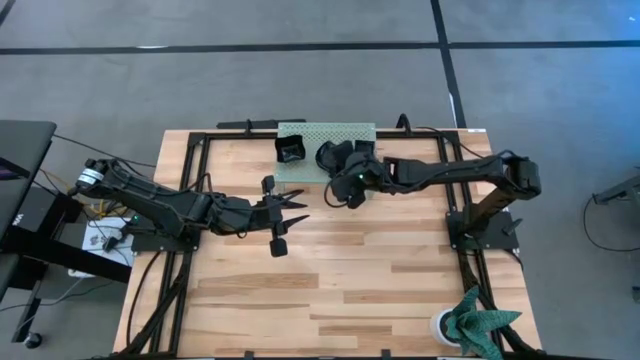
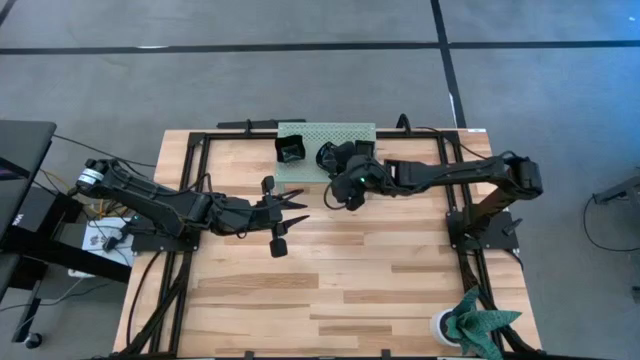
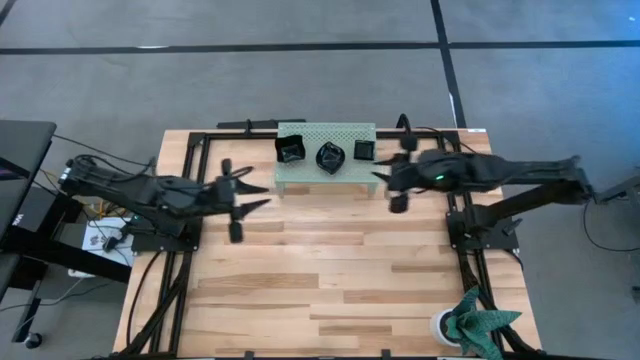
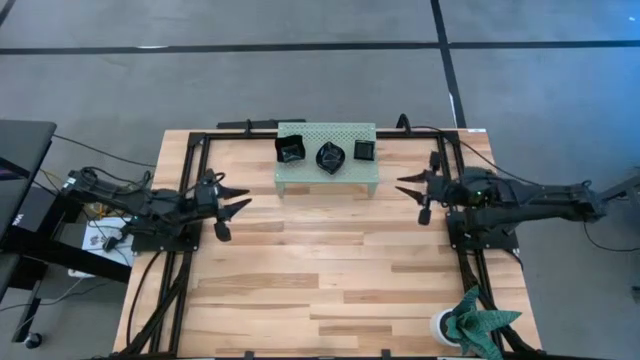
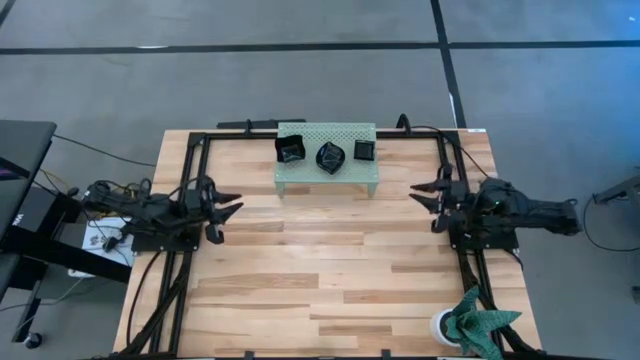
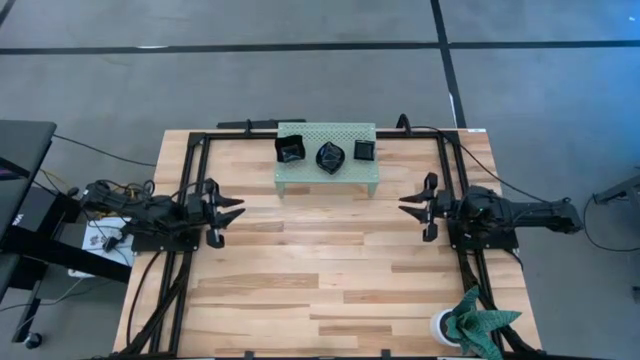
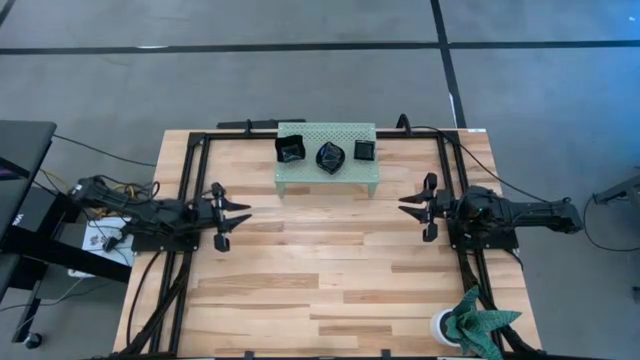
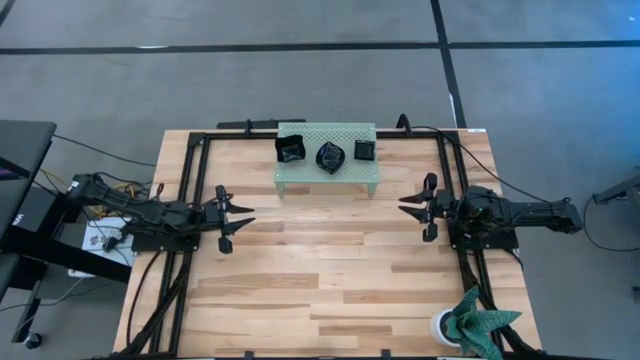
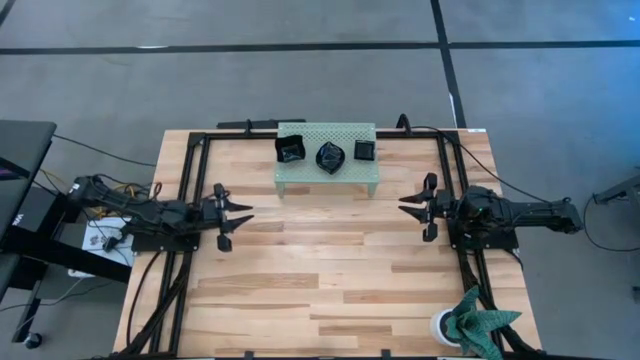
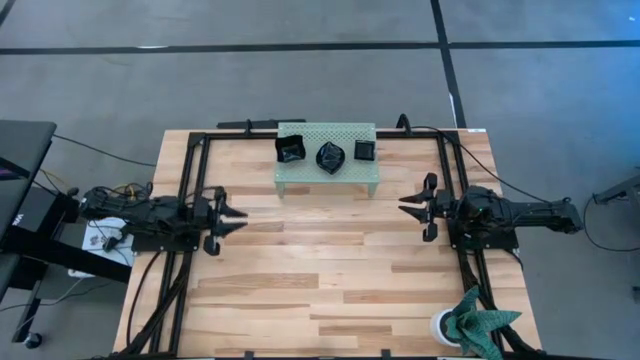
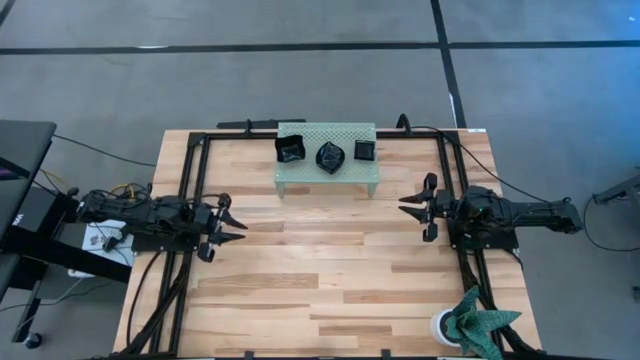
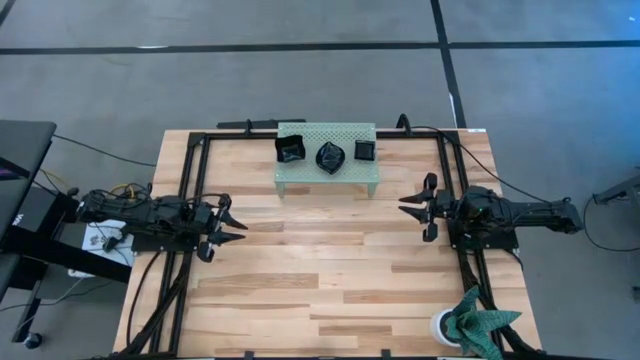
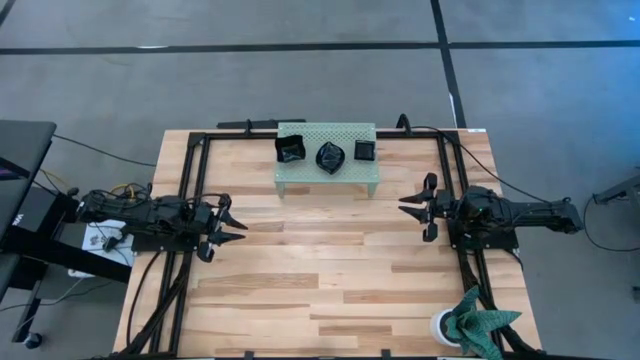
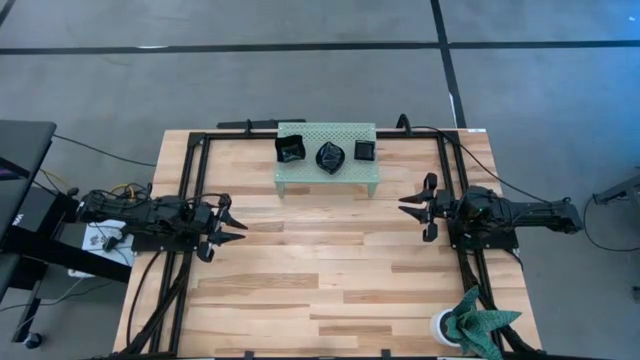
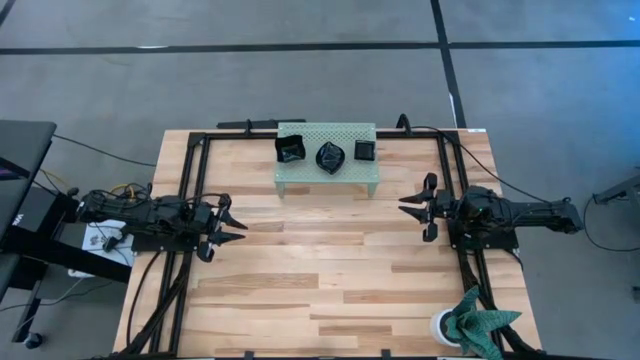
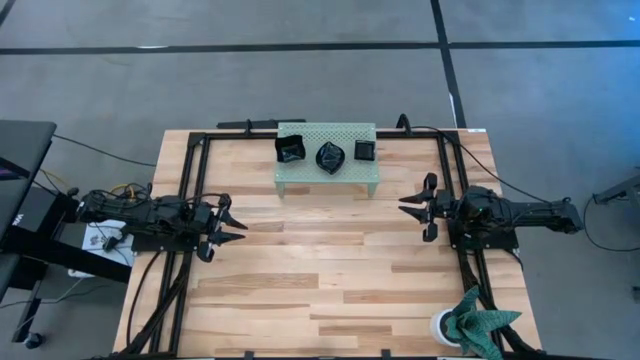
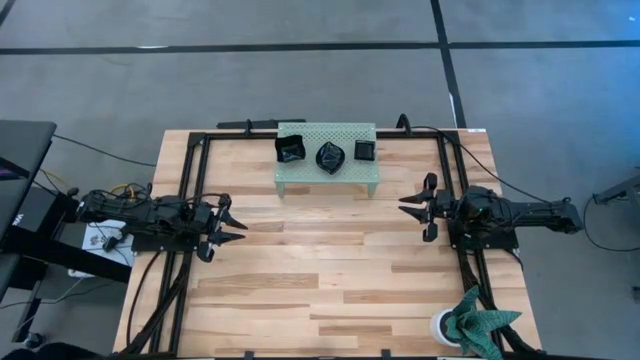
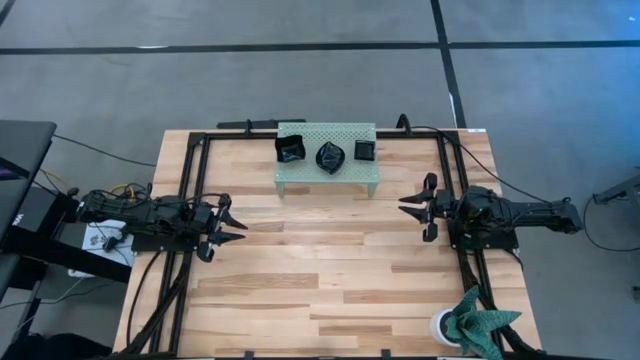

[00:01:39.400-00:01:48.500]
Task: Pick & Place Mini shaped plates
Return to Home Position

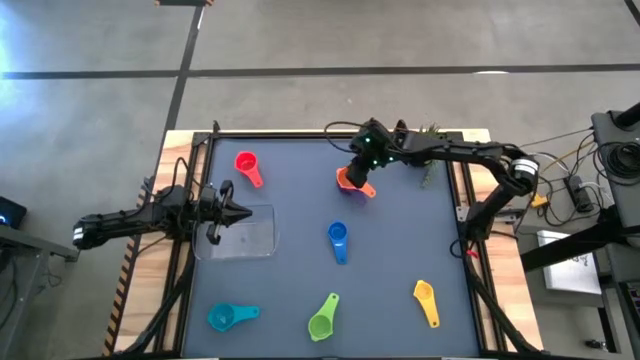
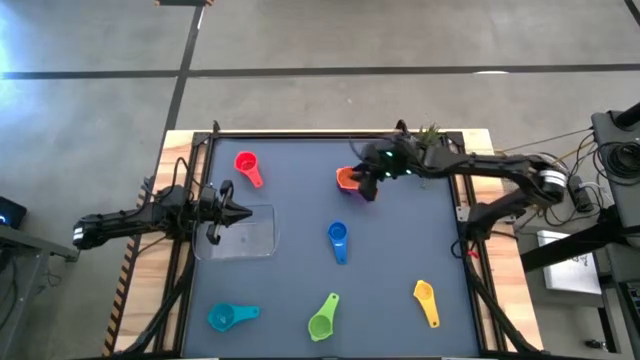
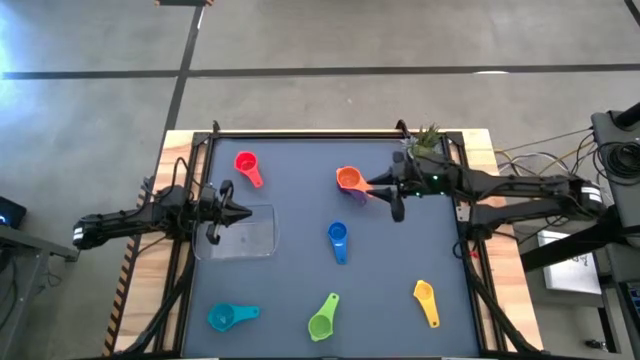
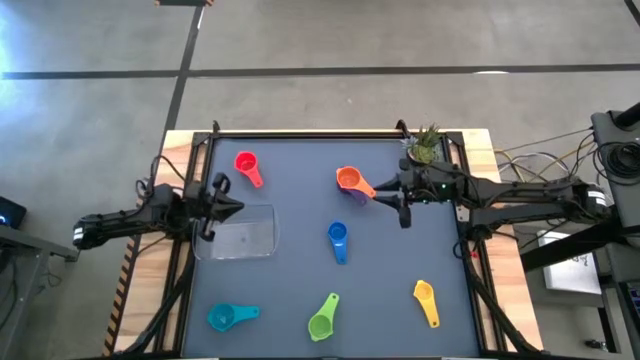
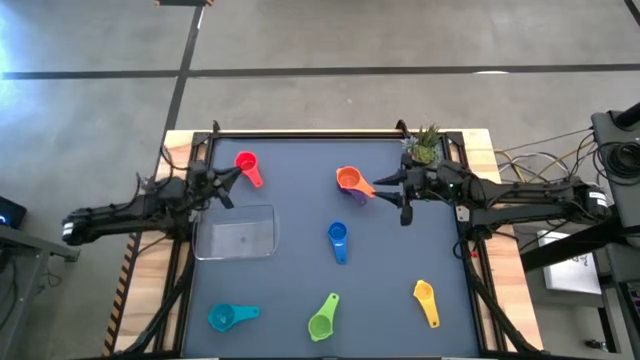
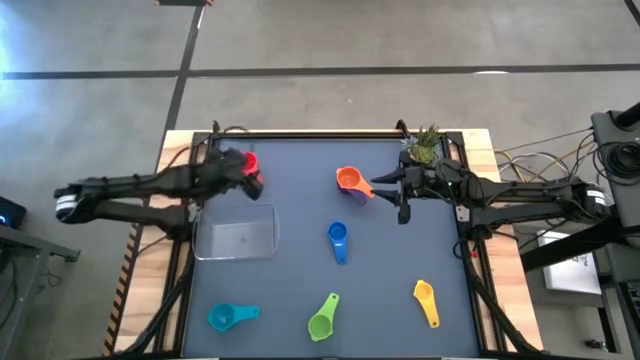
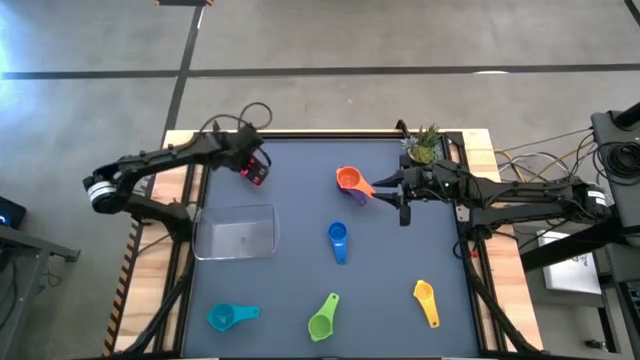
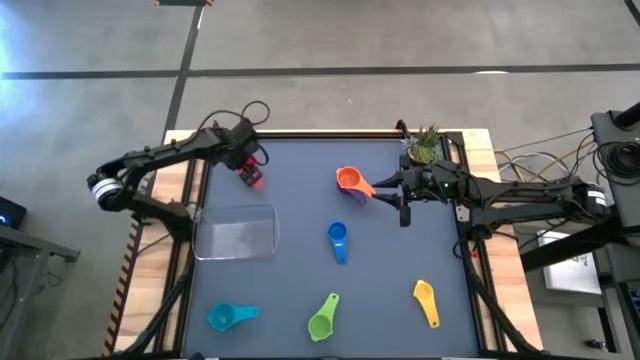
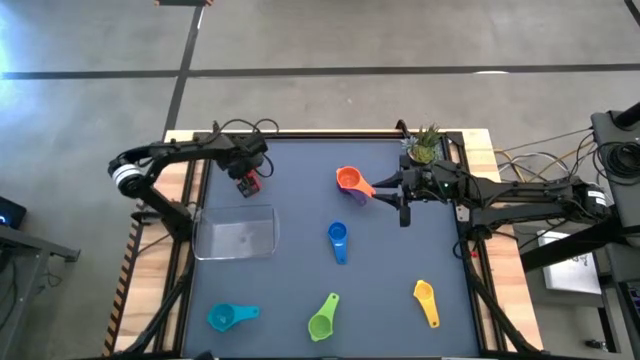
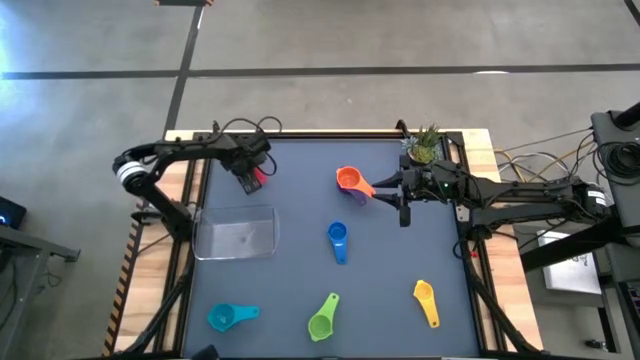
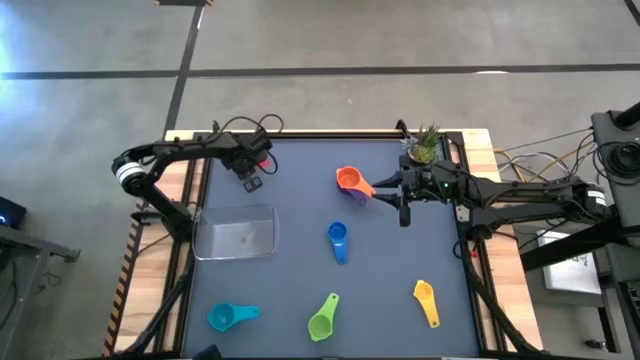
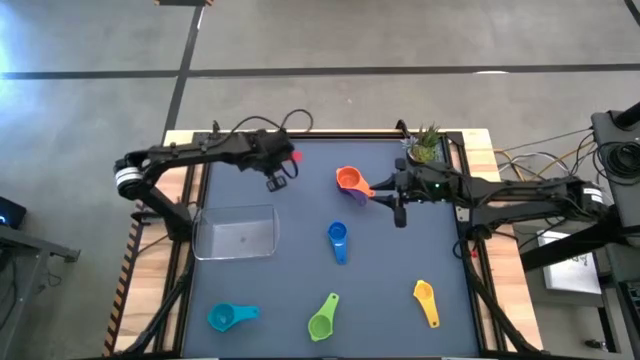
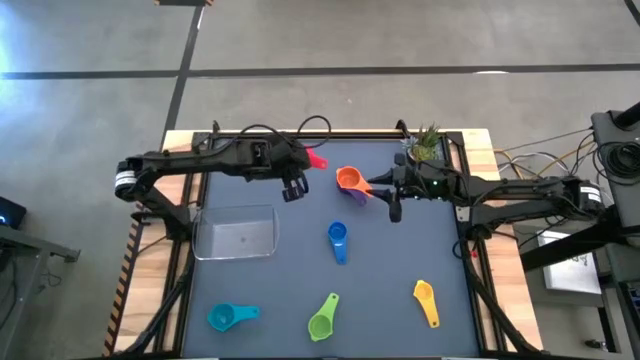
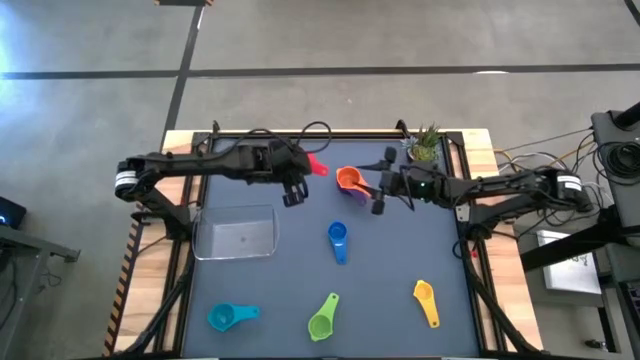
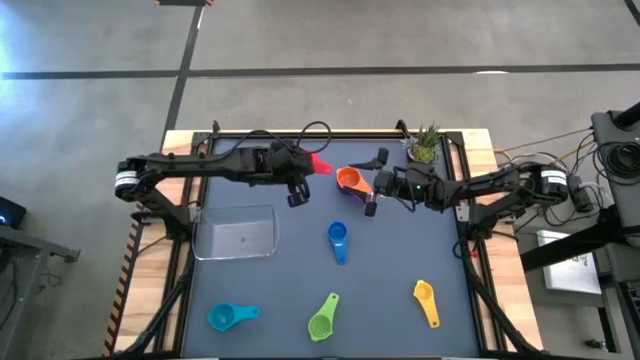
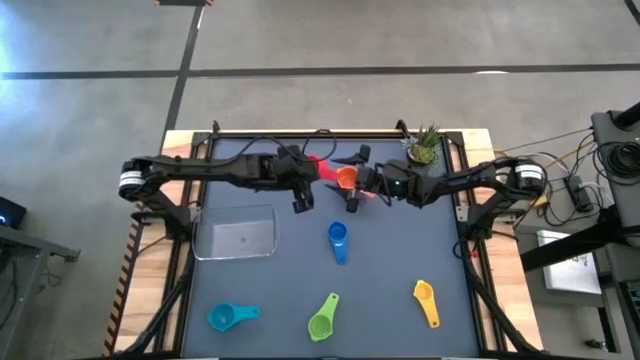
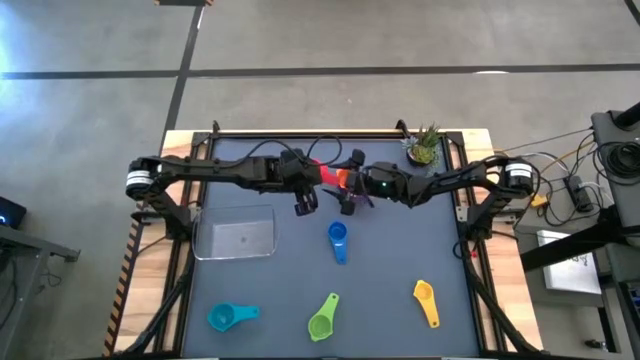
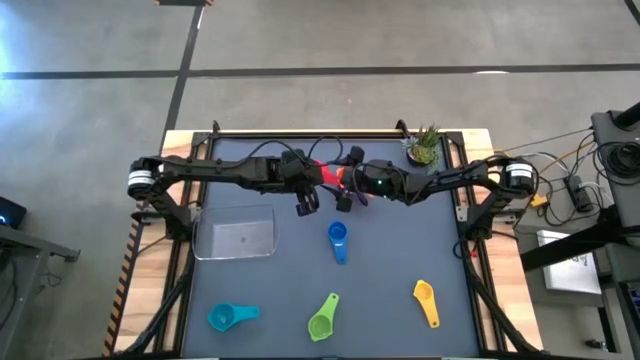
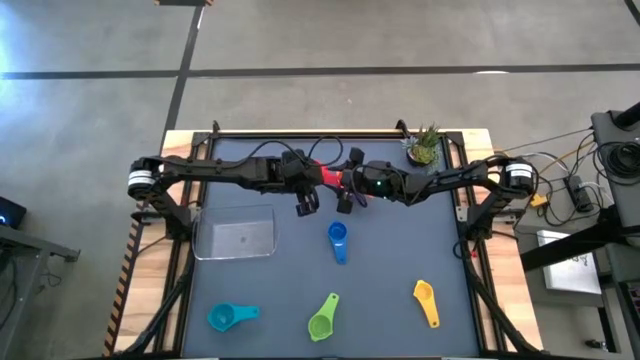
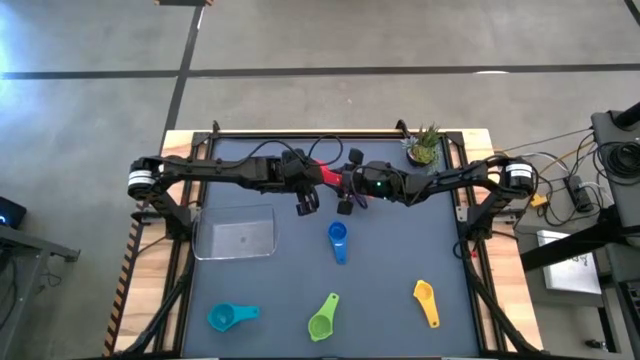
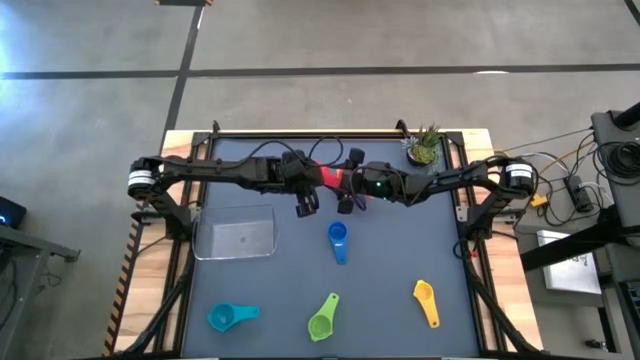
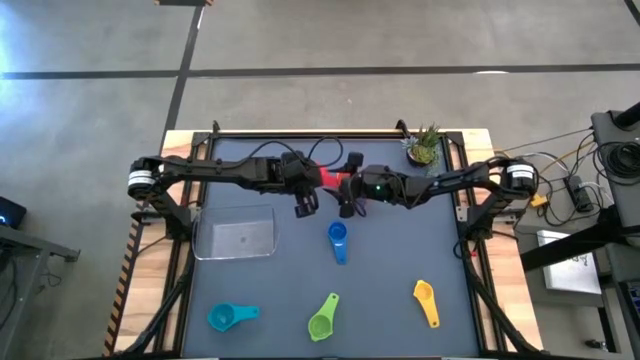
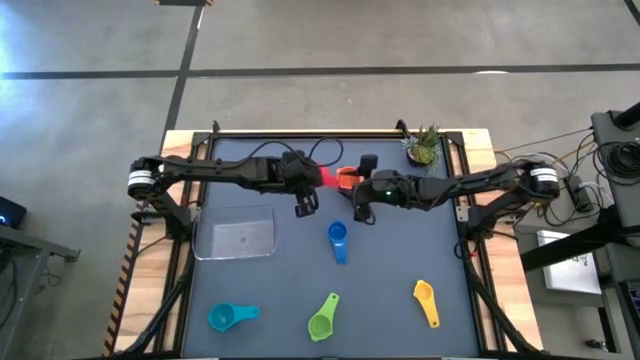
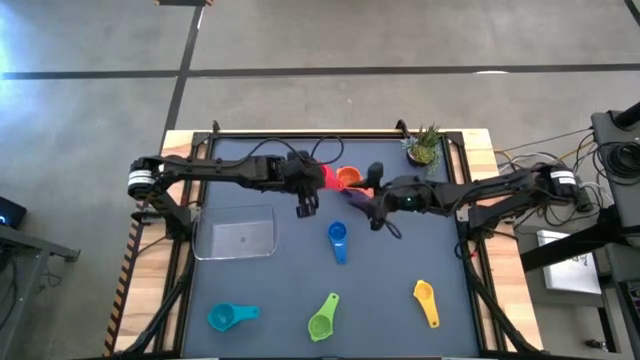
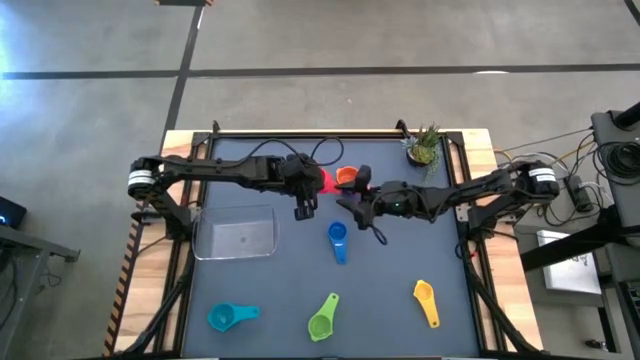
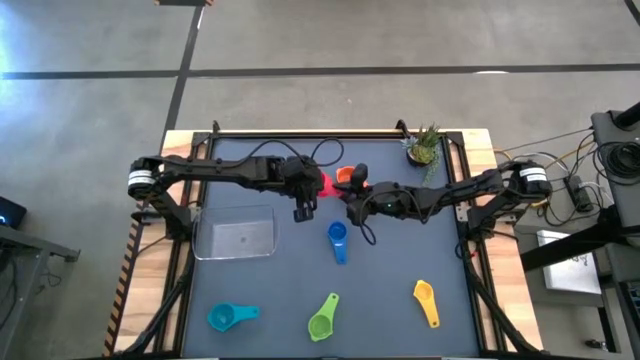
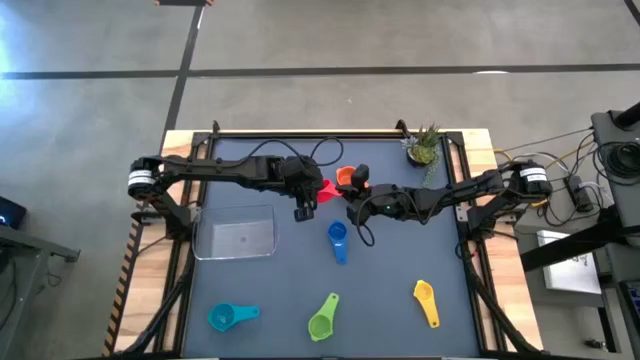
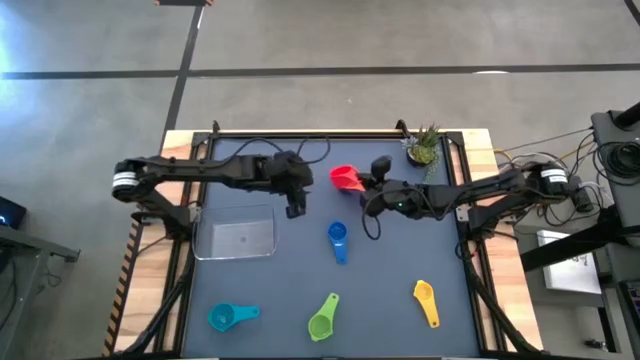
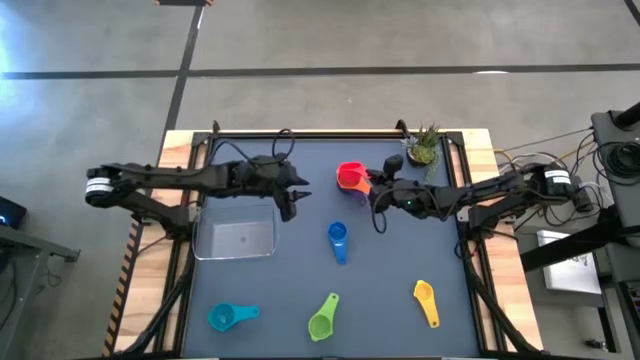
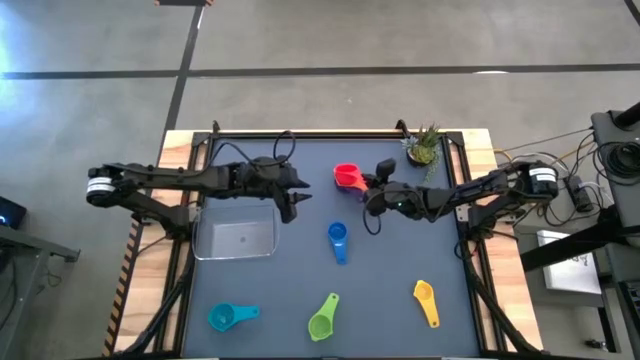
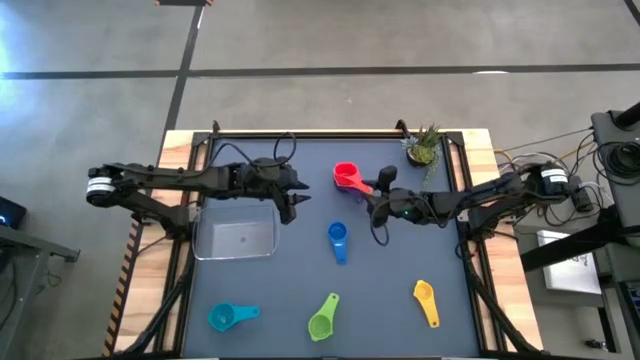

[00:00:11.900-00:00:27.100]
Task: Nest measuring cups in basket
Stack the red measuring cup on top of the orange measuring cup
